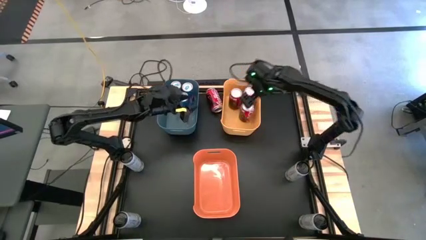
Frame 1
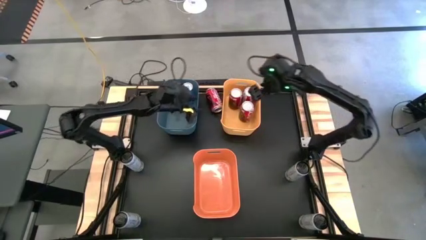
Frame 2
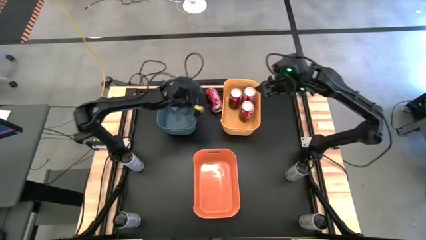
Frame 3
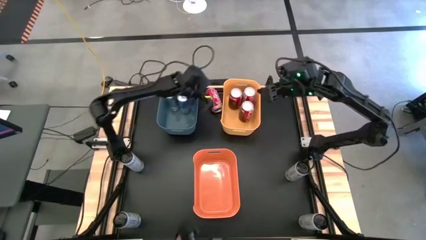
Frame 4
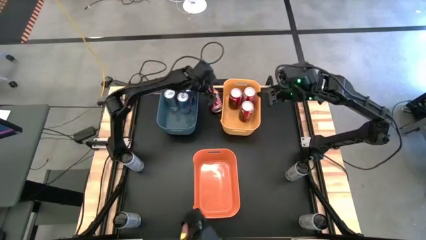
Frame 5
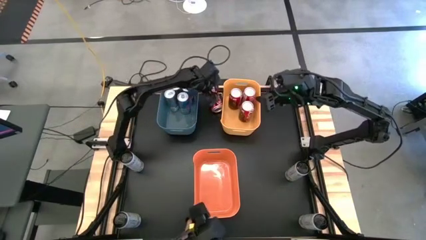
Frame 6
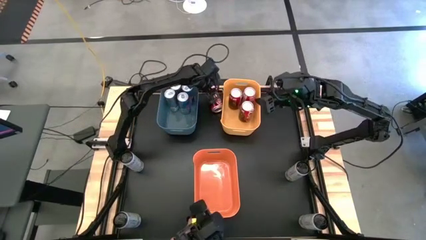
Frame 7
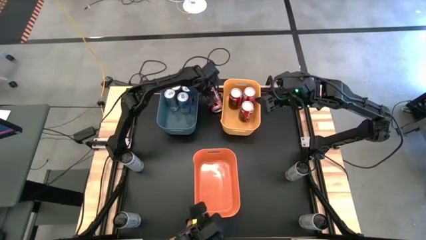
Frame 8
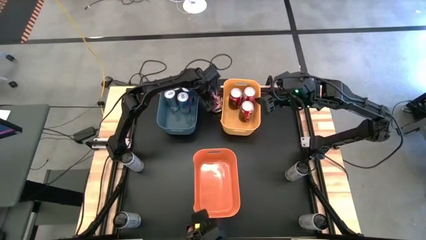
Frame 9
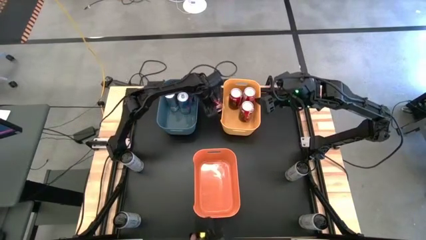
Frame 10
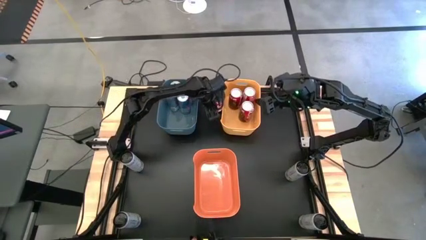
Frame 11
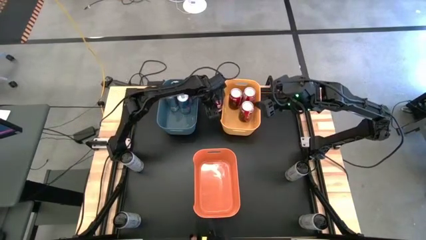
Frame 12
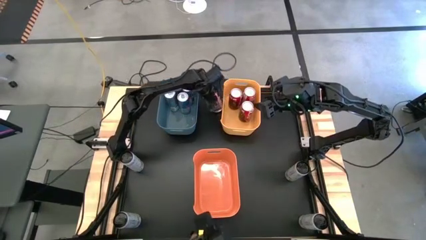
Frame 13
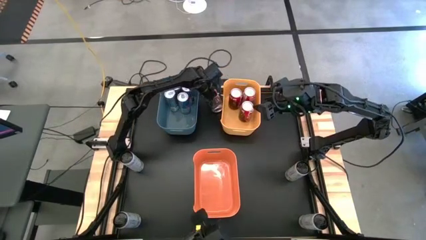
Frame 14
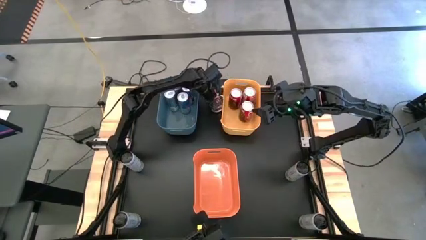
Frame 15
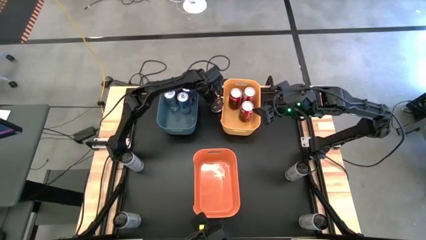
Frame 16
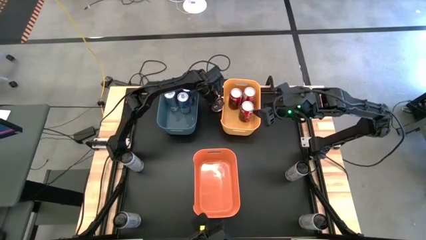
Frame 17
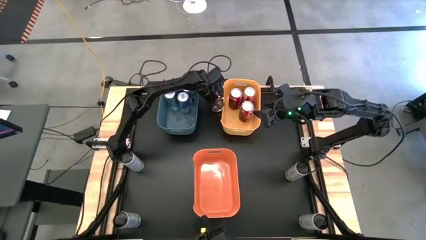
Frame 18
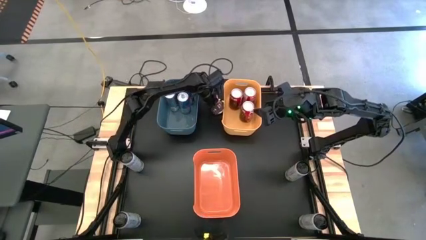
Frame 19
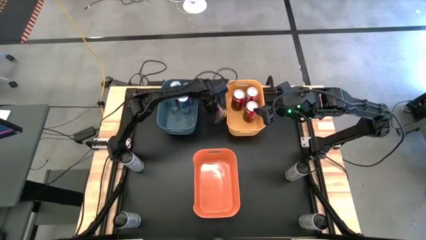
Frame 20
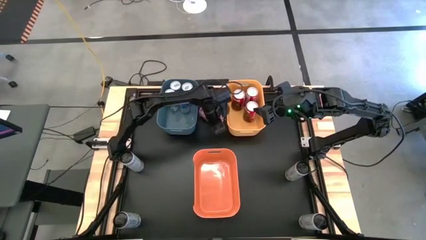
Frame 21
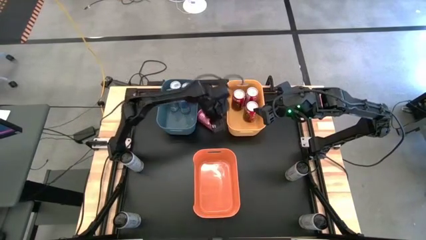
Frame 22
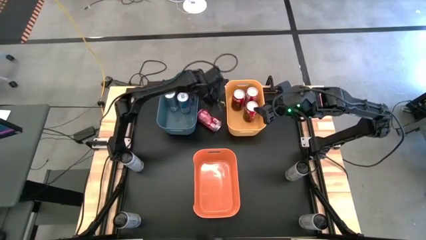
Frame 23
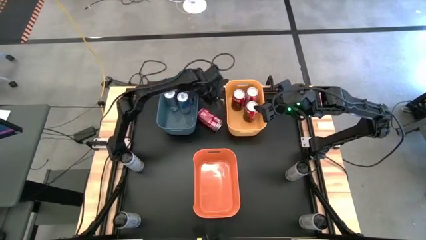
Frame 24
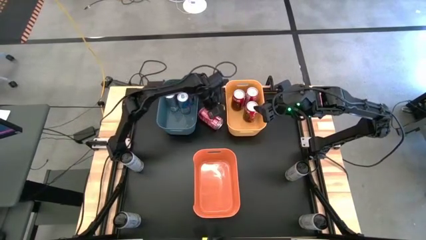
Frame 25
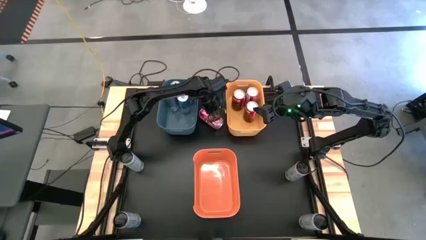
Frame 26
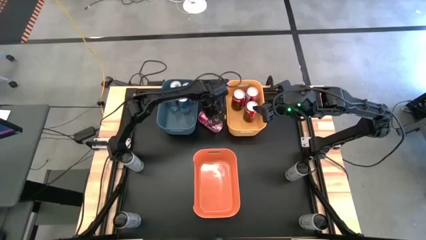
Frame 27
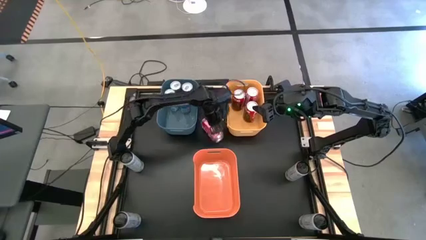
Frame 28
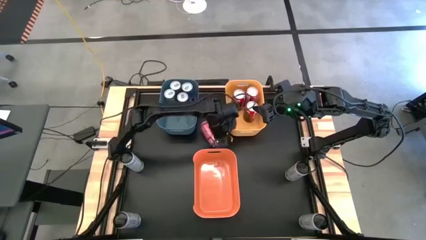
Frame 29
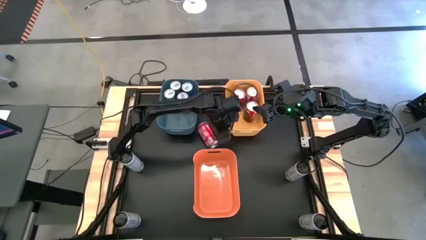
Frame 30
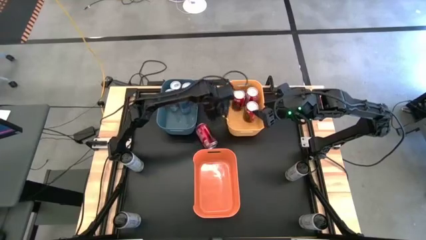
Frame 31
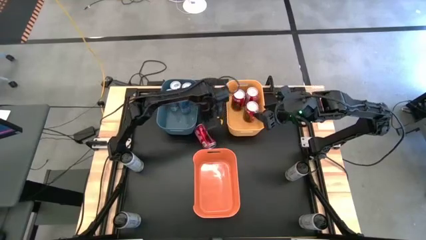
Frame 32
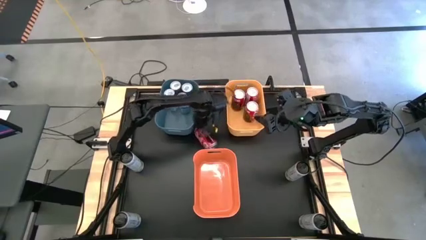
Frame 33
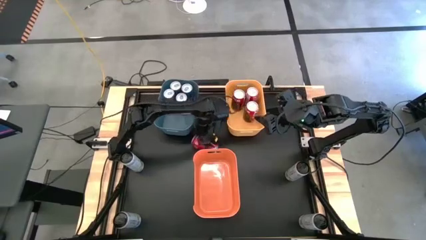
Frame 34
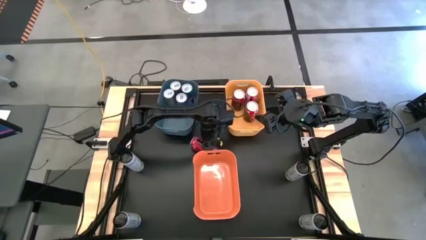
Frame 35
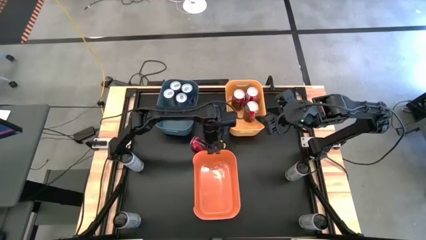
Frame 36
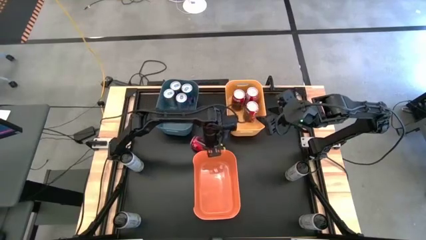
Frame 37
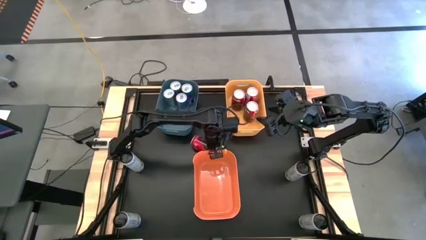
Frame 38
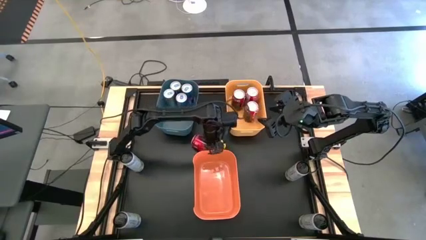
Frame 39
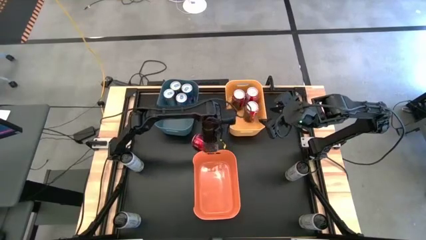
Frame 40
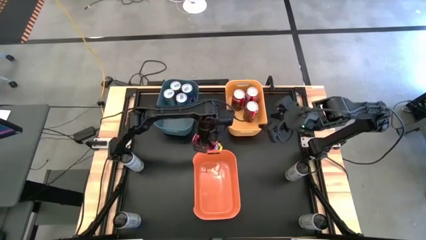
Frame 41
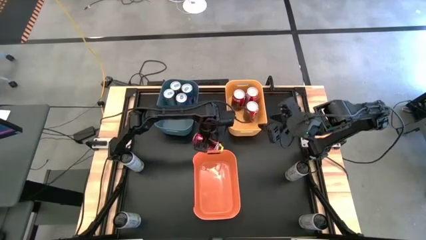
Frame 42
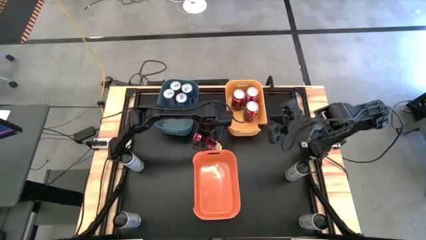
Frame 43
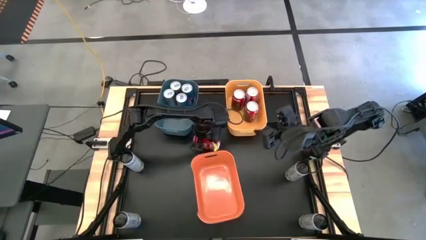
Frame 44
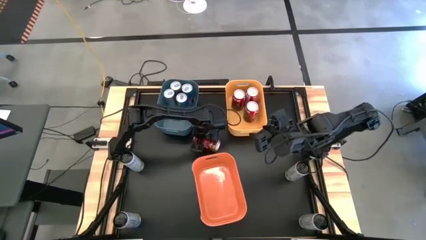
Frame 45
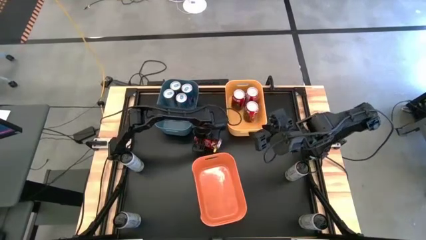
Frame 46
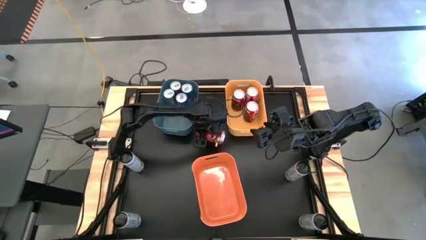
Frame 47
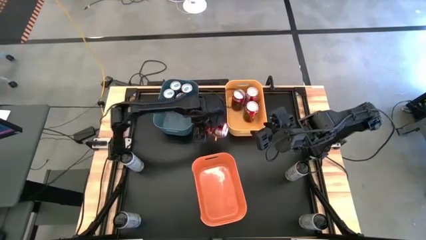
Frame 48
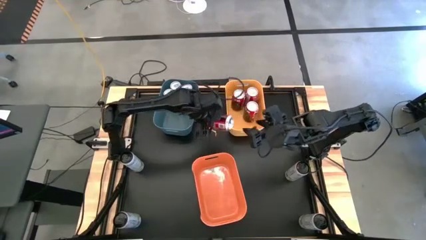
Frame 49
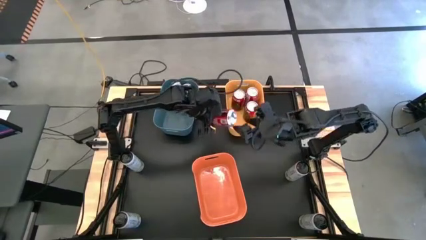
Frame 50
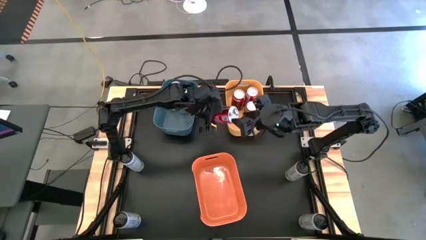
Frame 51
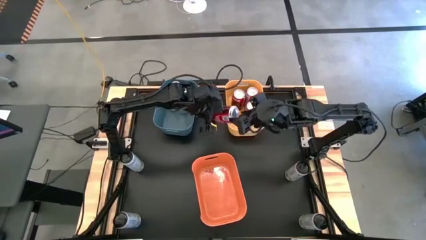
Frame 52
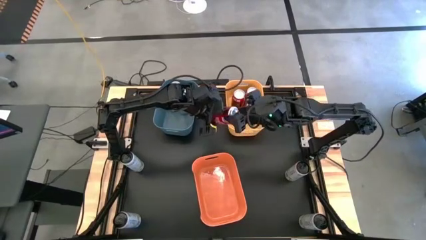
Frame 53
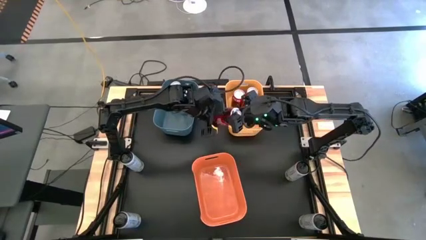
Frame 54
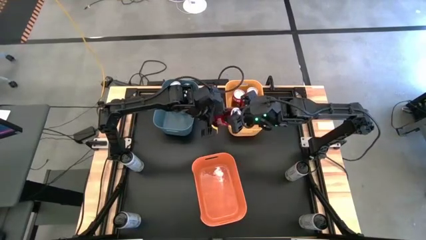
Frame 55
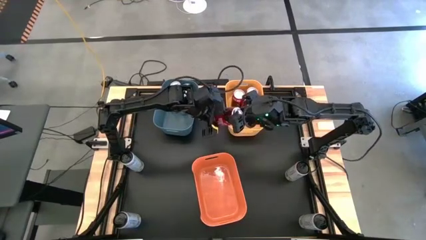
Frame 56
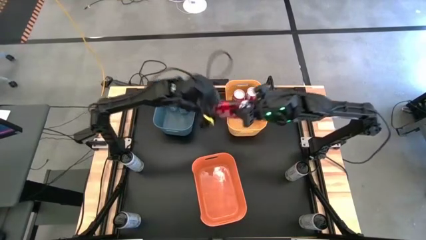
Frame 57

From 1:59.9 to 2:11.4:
Task: Sort soda cans
Put the red soda can into the yellow bin

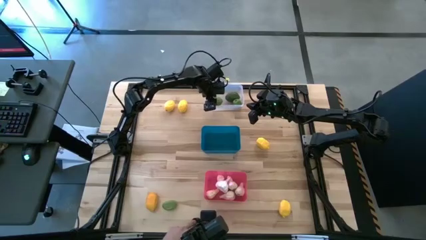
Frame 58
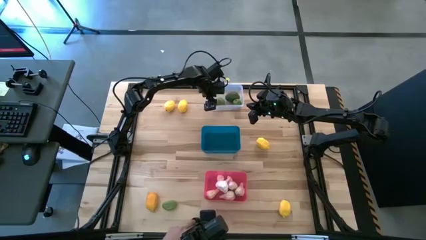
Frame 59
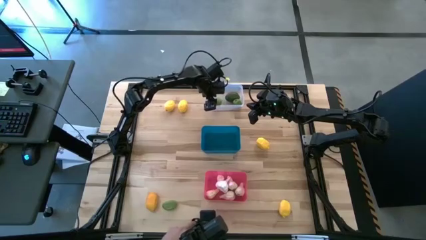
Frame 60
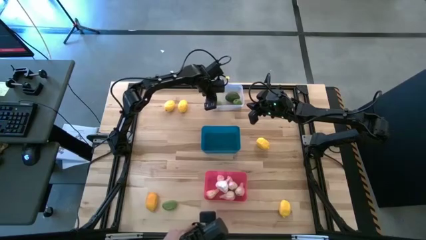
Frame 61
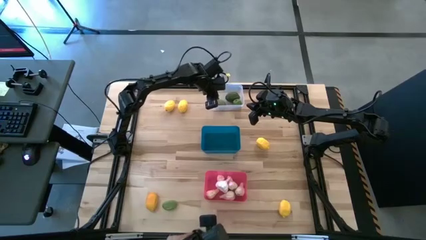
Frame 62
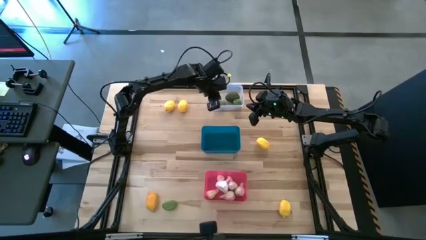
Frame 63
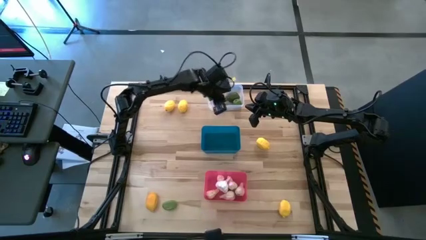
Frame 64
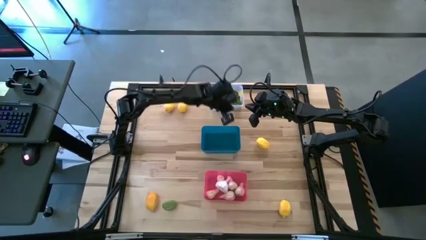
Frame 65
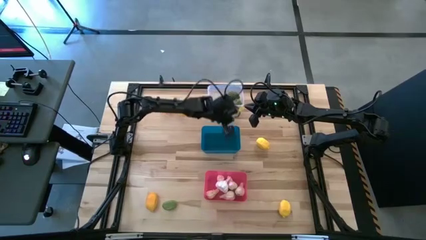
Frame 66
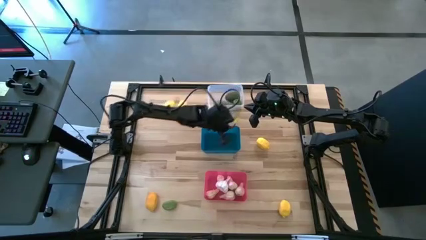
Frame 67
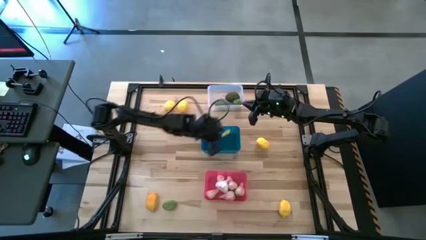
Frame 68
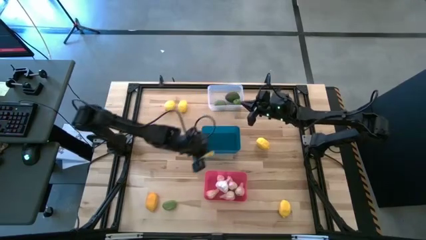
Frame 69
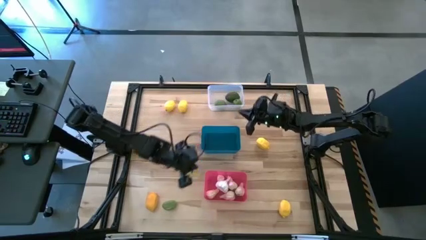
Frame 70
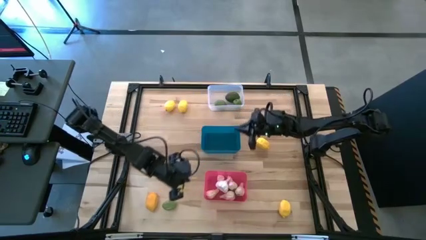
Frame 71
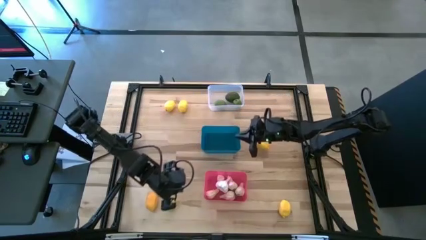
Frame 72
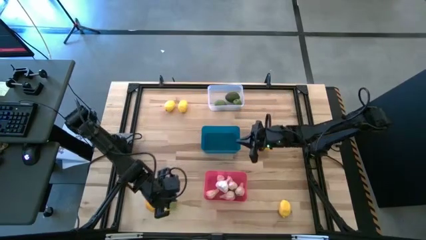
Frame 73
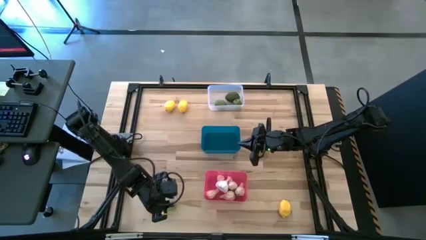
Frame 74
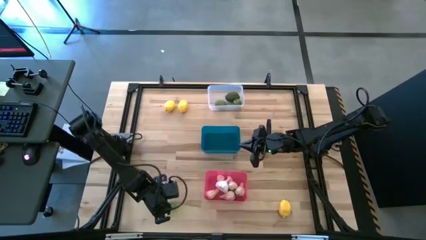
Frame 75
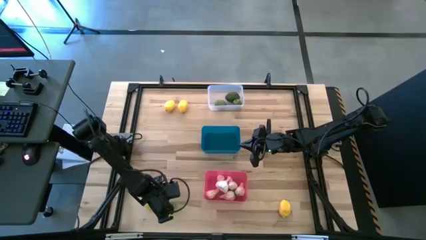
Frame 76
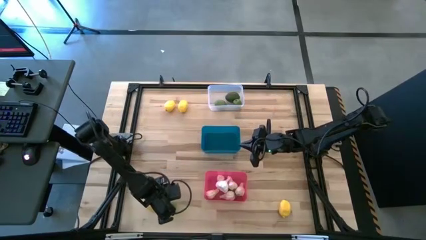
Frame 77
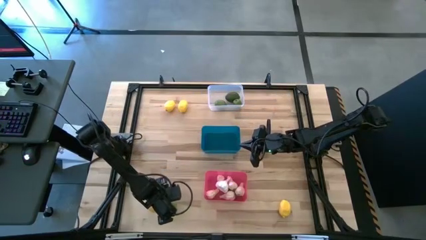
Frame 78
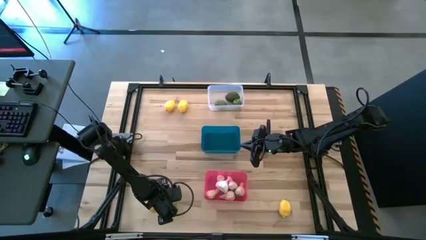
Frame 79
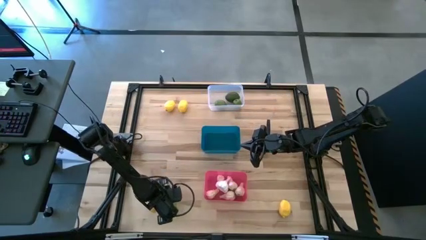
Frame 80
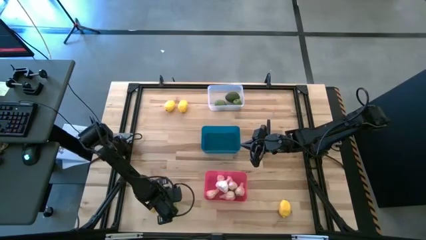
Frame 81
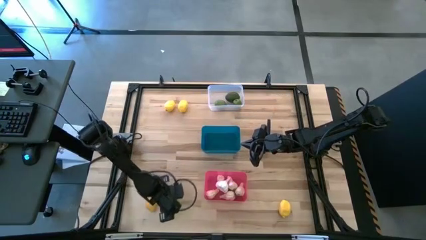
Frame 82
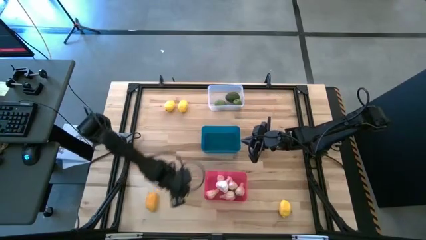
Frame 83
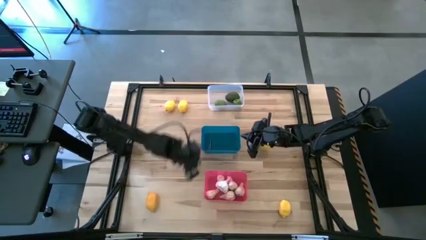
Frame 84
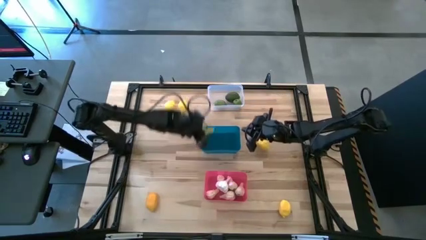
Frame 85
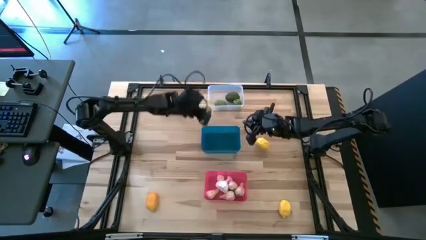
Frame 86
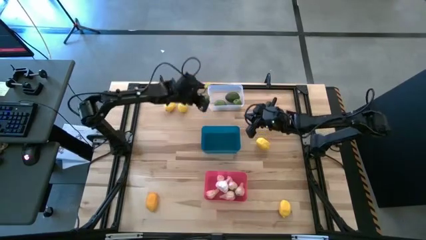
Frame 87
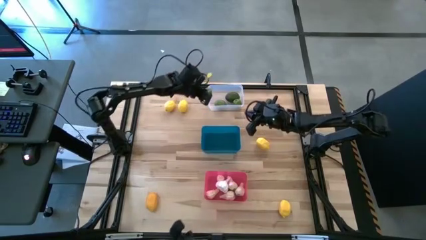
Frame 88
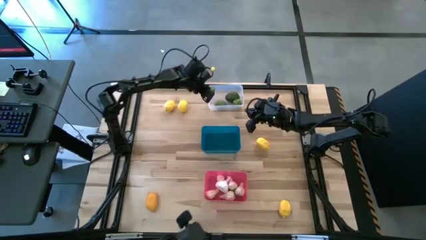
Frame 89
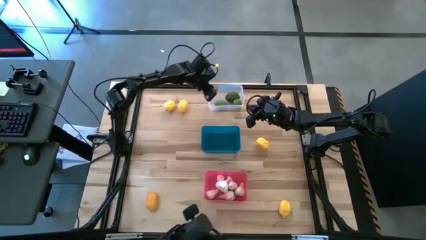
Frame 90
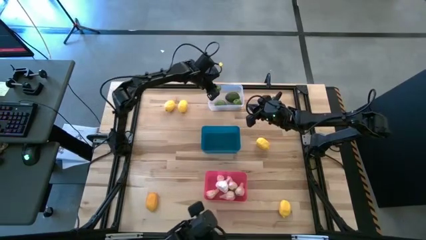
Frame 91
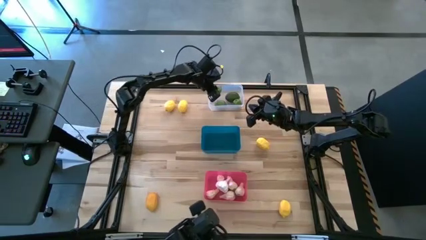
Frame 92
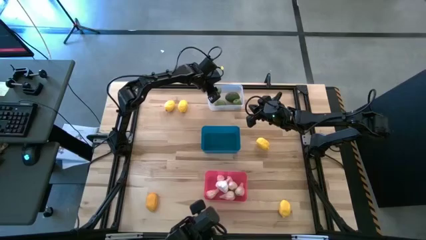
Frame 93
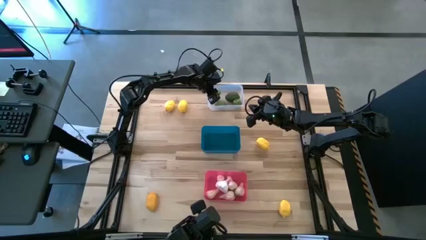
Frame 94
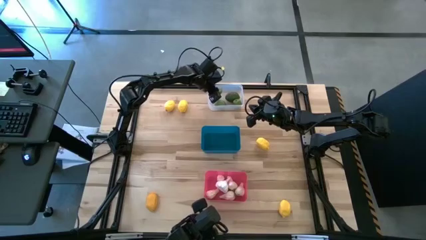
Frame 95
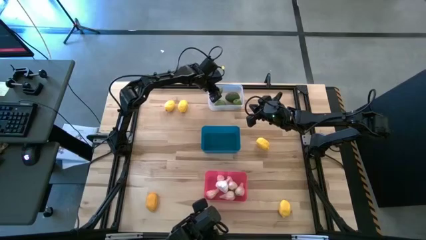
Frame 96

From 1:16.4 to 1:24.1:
Task: Sort produce into baskets
Put the green lime into the transparent bin
